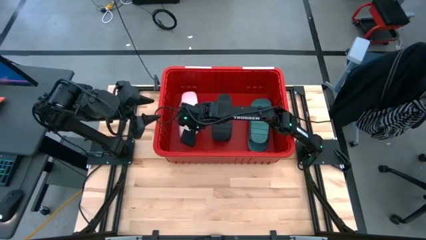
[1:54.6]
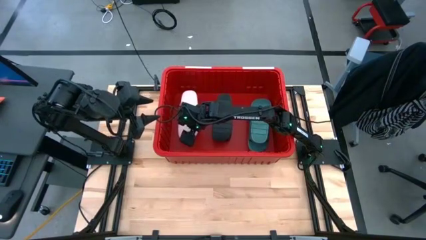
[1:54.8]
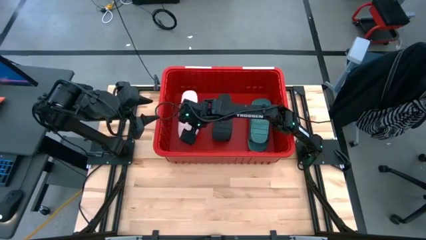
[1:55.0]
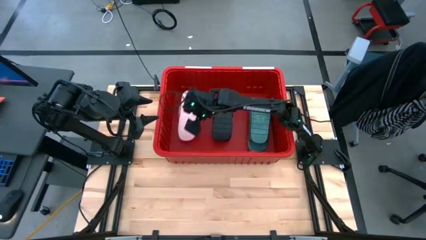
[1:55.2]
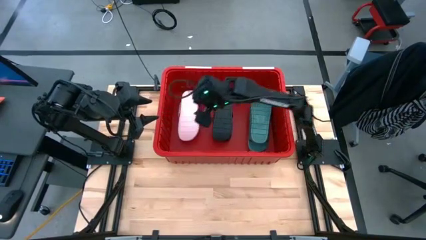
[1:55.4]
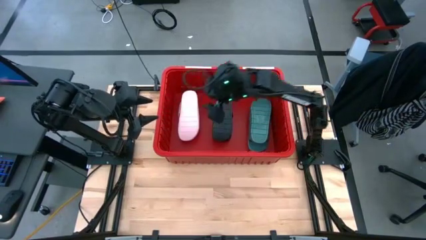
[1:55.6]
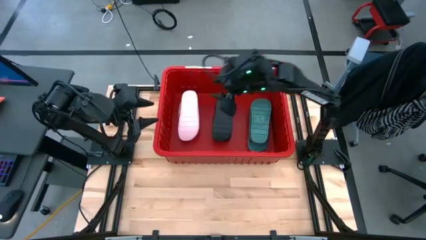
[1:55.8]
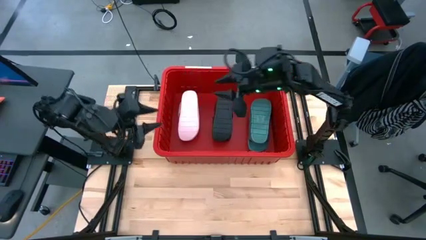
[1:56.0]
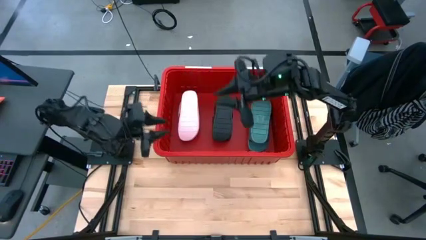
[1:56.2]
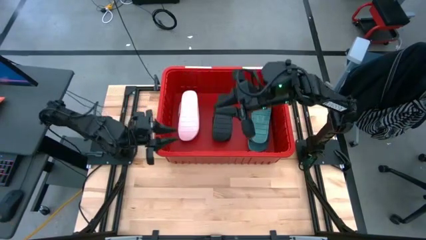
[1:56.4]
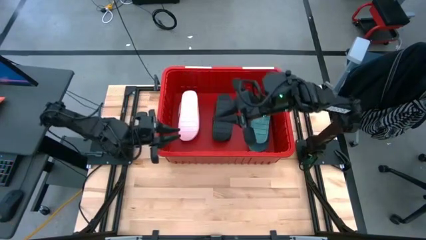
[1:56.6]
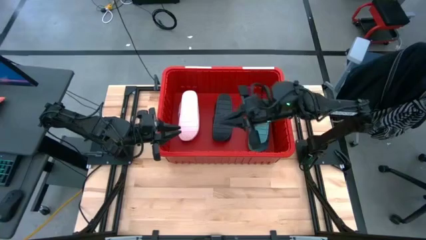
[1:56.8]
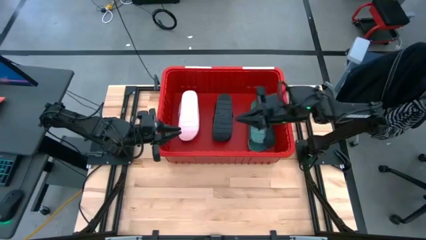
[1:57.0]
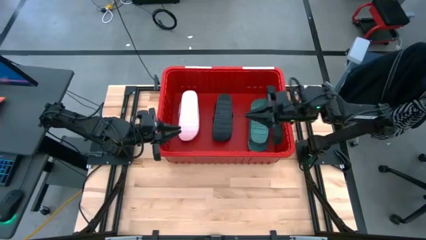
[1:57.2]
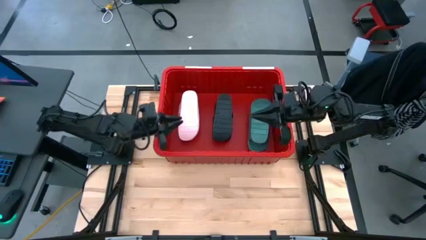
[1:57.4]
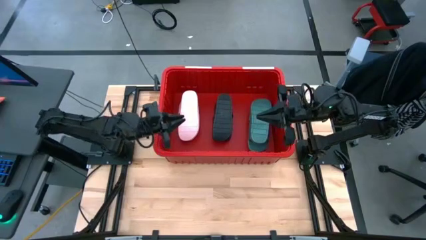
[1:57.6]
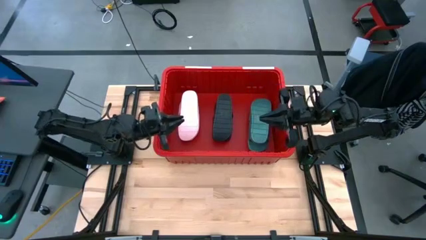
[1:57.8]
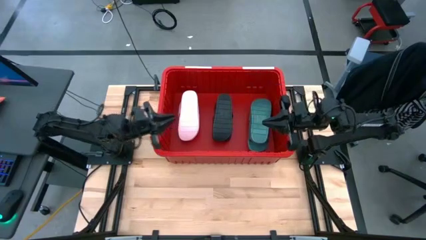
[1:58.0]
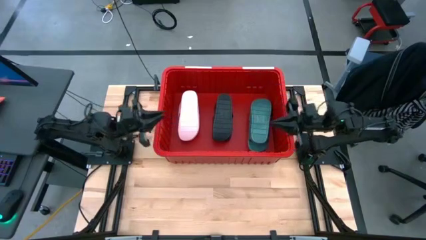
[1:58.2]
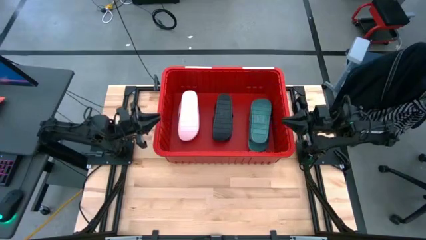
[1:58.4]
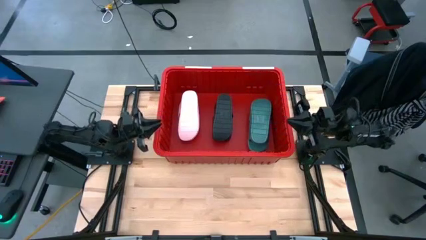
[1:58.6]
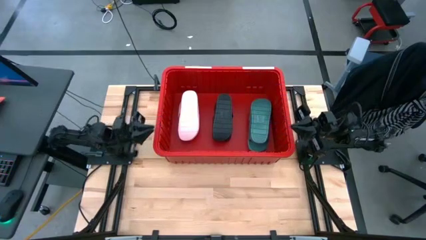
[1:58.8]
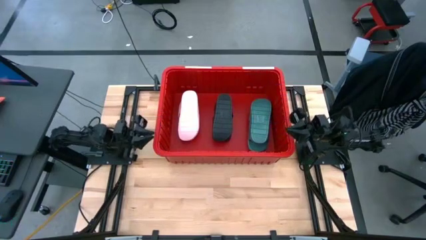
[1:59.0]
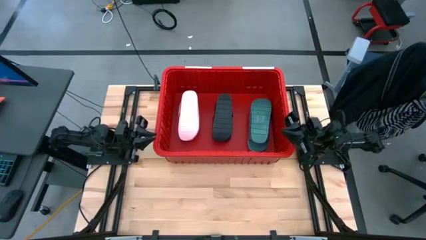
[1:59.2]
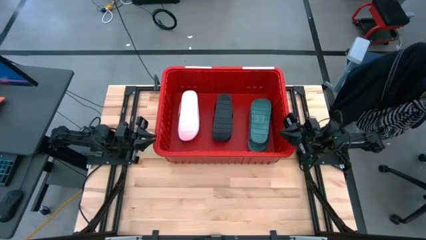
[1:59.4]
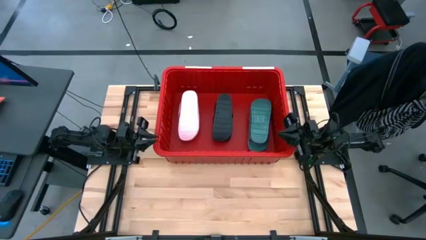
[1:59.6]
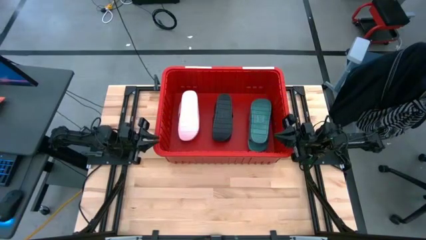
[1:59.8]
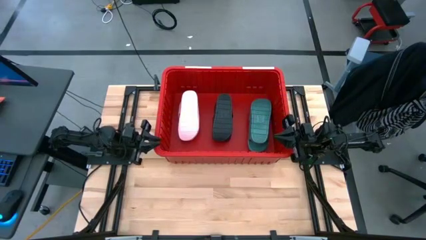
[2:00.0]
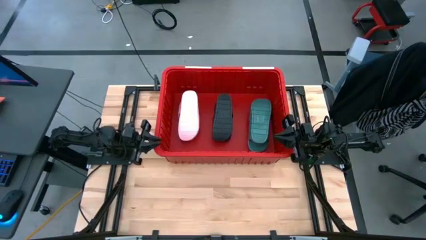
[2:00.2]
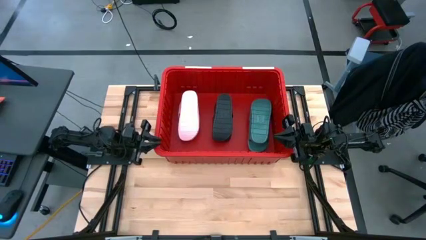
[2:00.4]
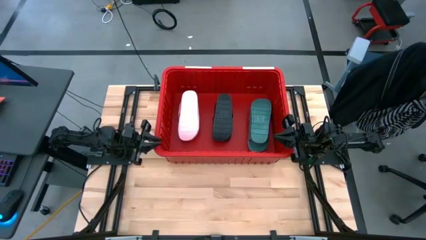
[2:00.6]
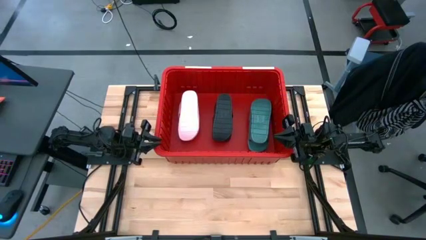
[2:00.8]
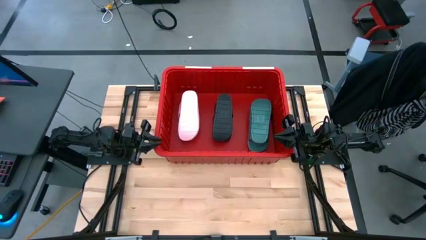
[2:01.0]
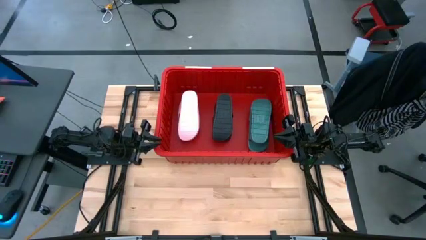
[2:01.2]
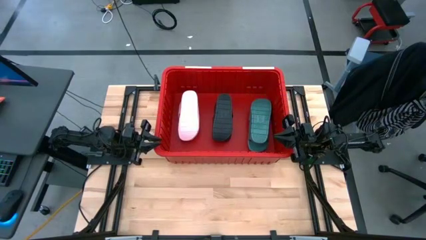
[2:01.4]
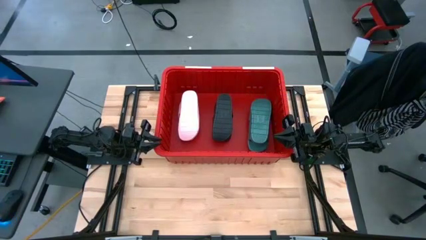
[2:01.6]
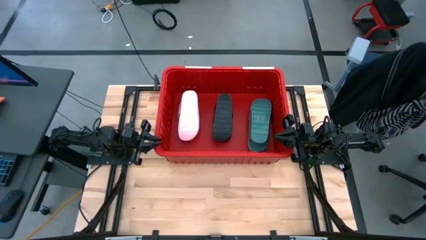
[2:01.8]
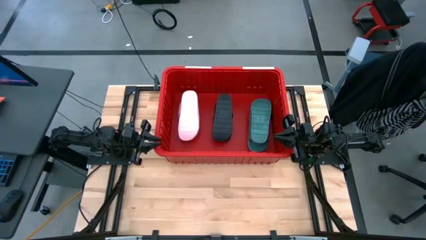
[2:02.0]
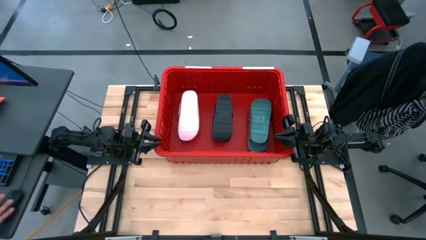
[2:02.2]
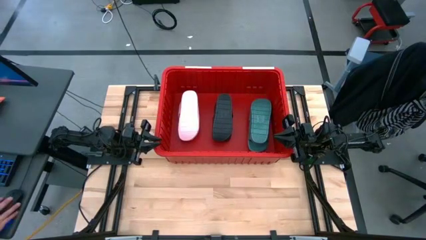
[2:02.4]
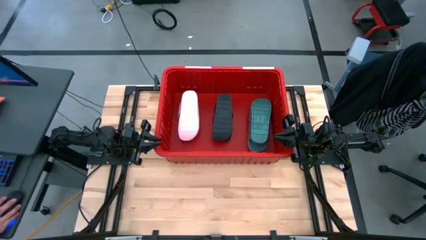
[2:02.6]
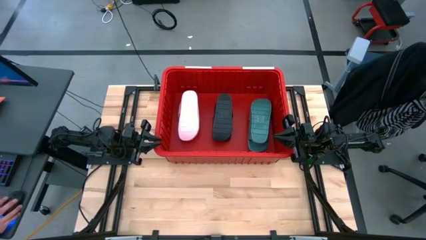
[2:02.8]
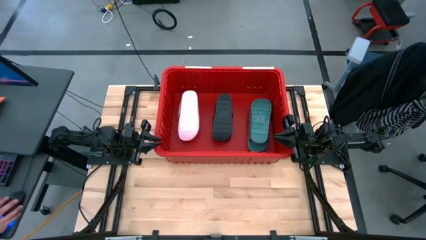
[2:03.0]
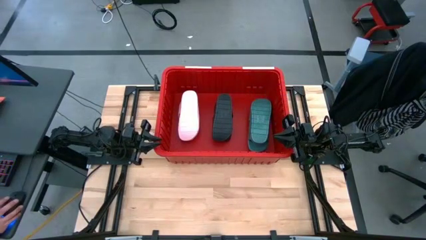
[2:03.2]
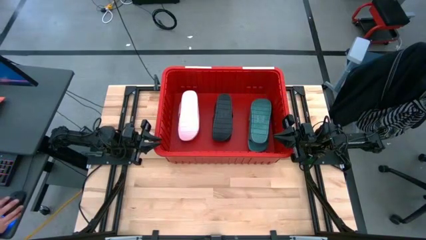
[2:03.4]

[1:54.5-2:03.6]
Task: Pick and place slides into bin
Return to Home Position

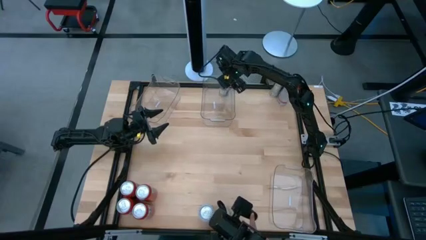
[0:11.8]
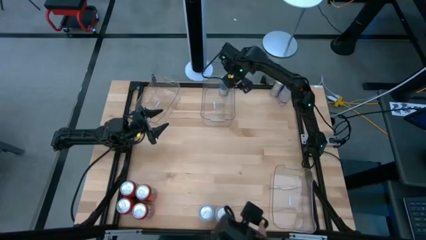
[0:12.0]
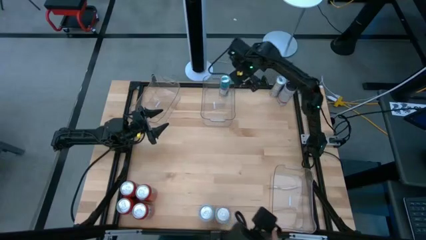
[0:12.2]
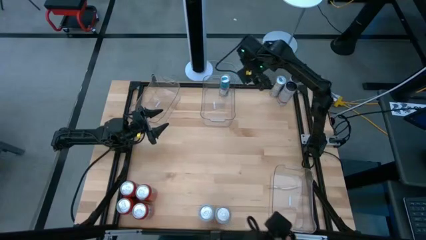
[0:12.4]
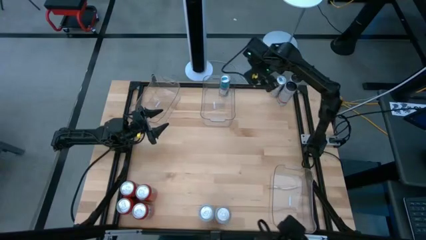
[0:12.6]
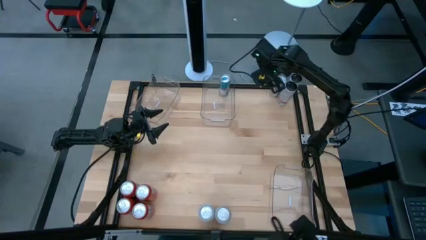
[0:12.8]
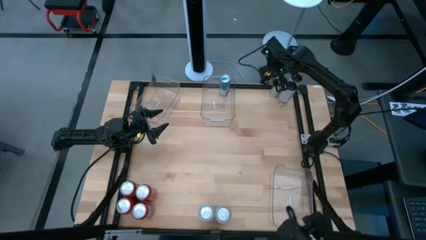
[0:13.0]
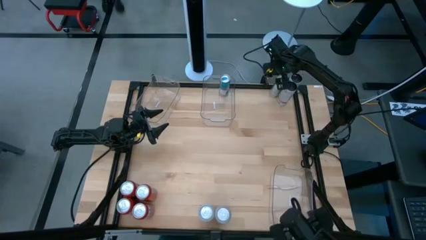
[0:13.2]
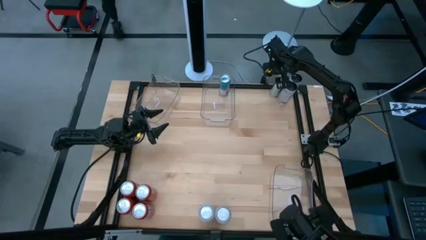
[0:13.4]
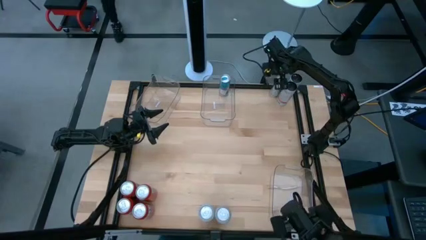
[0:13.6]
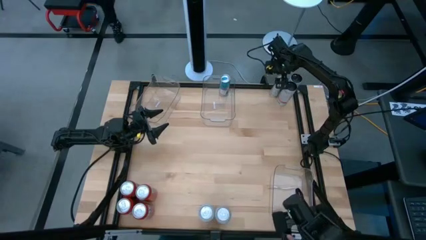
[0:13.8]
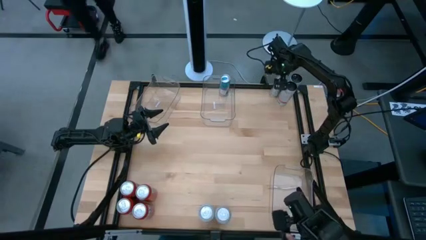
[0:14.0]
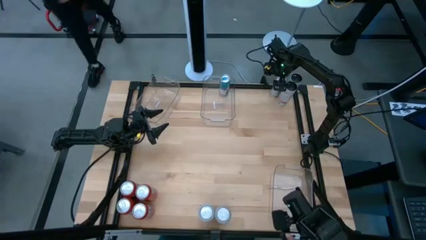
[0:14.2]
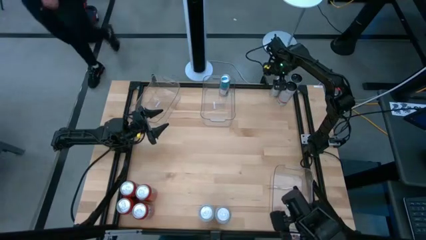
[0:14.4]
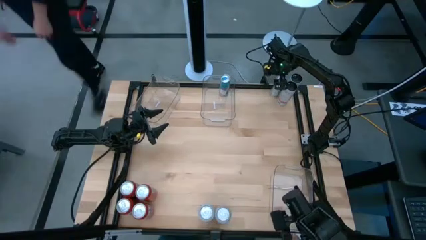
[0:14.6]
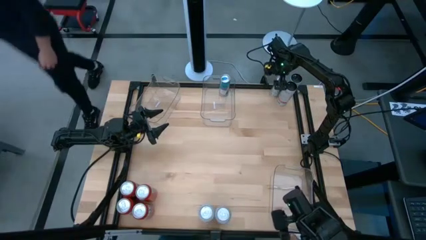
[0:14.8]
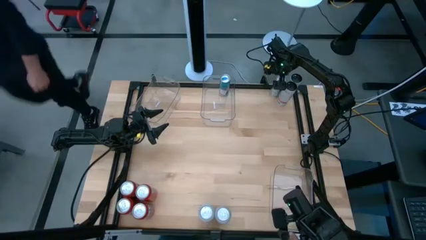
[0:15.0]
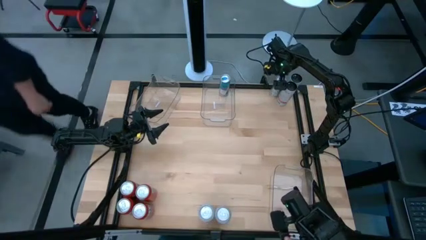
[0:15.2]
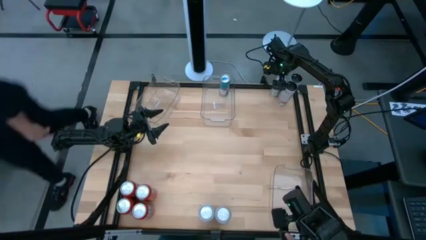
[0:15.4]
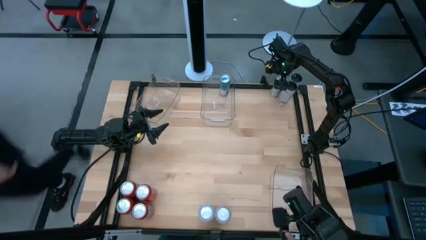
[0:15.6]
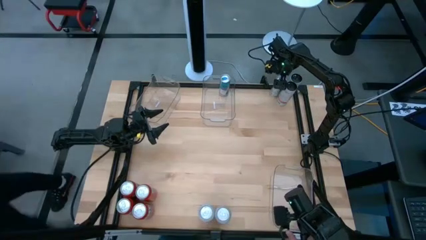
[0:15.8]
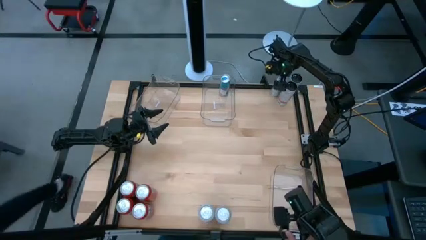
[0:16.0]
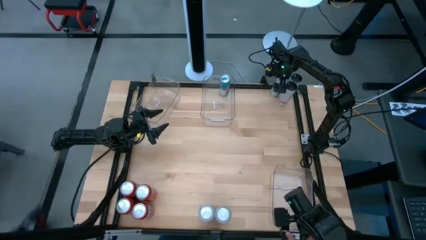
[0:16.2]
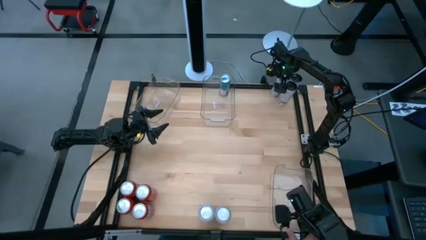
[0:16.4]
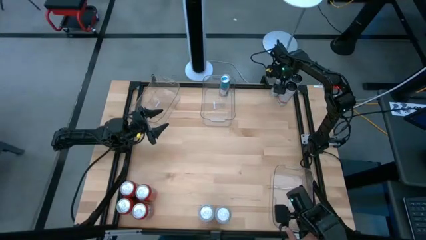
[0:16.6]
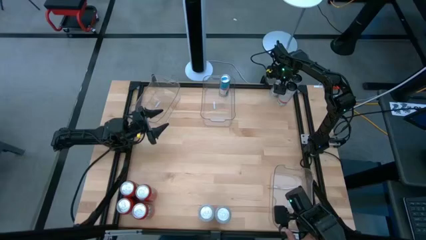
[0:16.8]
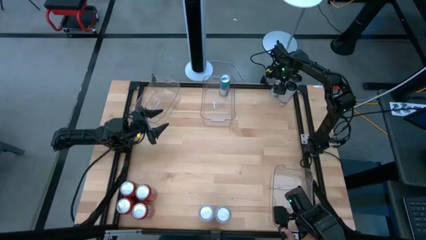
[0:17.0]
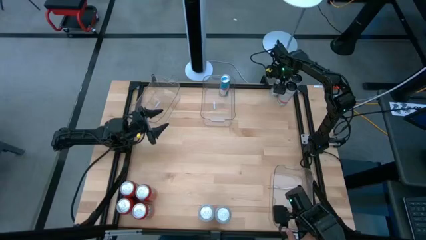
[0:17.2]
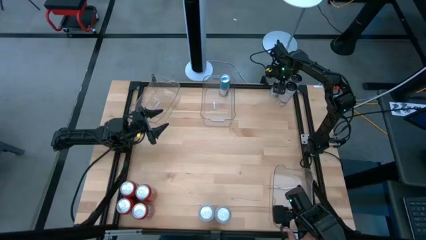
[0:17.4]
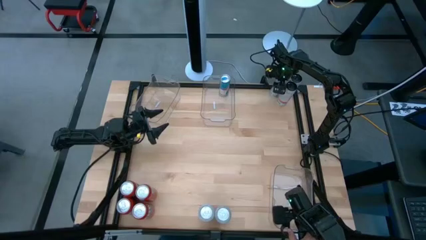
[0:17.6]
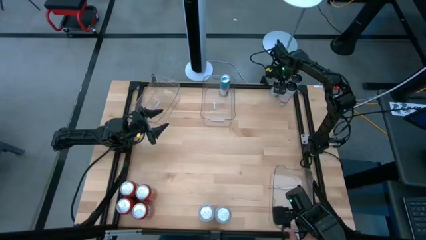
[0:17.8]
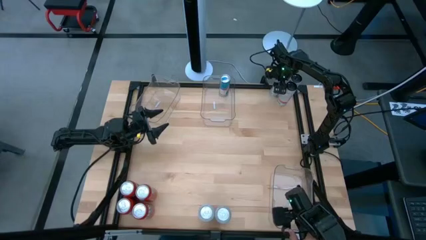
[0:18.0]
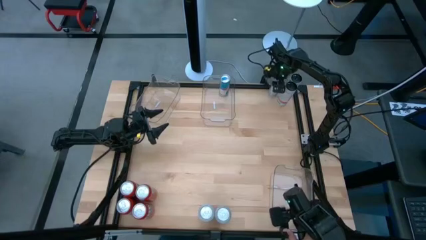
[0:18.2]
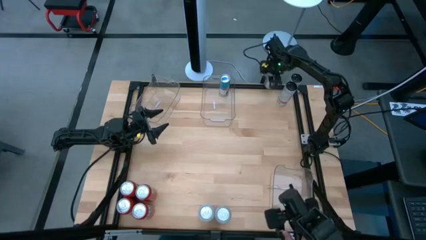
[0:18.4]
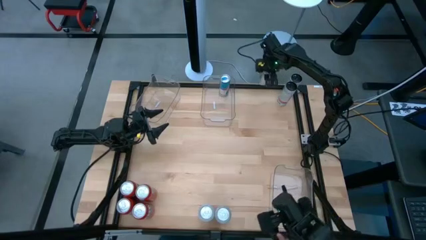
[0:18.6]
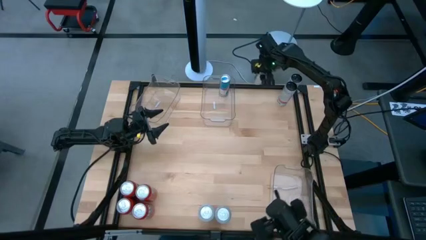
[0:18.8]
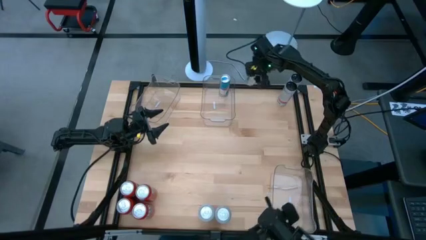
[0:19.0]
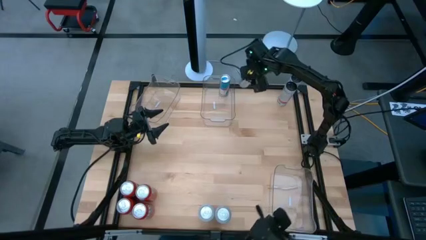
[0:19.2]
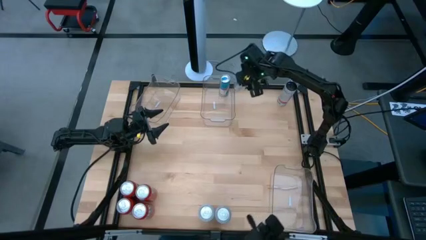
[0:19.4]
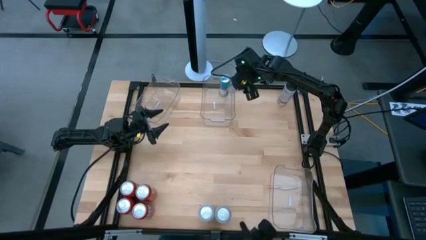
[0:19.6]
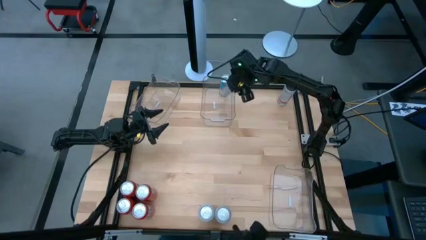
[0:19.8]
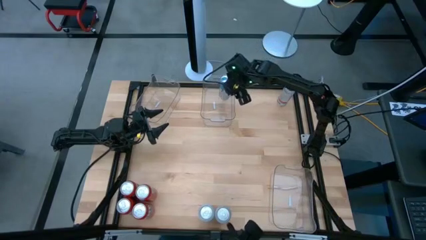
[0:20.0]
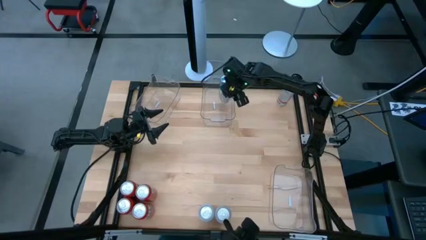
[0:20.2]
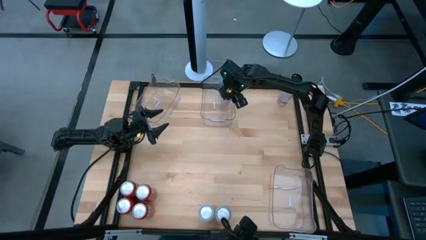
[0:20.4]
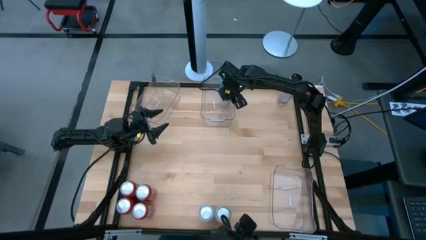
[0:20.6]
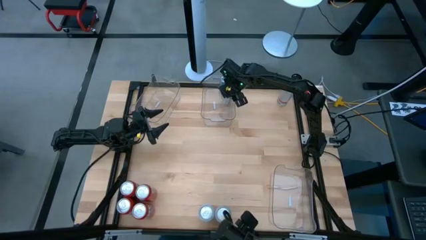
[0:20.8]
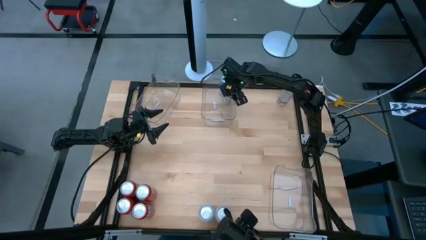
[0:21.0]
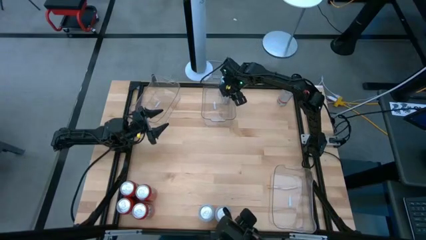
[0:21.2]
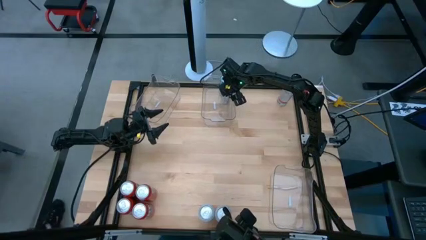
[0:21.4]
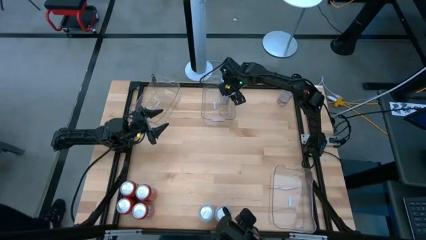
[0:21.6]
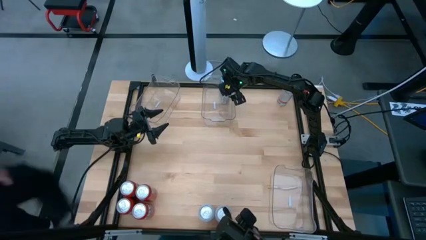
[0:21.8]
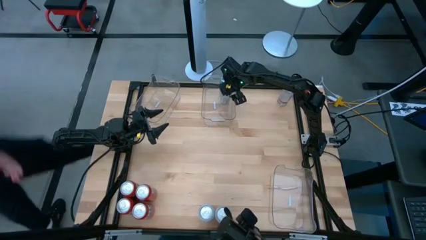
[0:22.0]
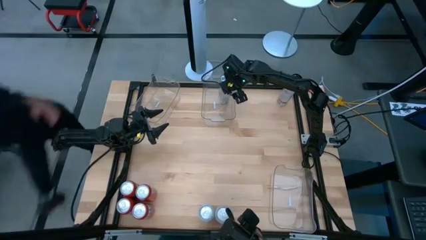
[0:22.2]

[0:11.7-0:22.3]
Task: Sort soda cans
Put the blue soda can into the top middle transparent bin
